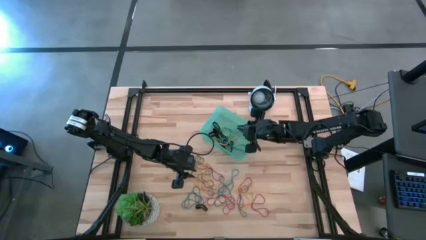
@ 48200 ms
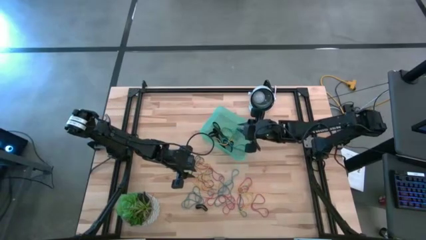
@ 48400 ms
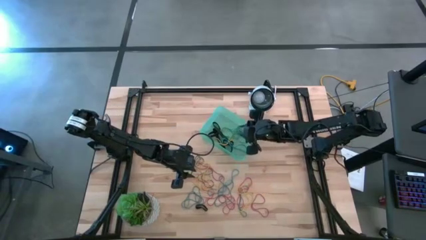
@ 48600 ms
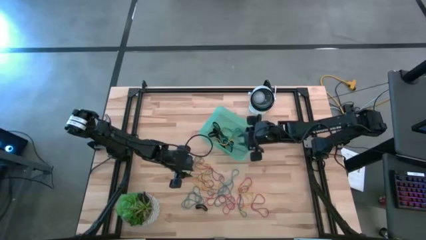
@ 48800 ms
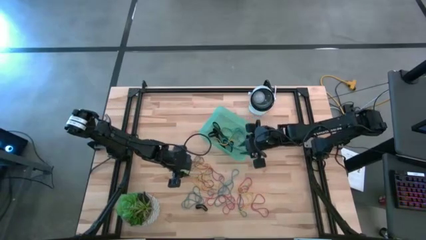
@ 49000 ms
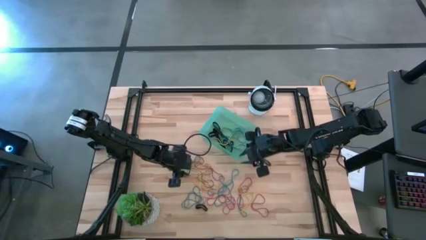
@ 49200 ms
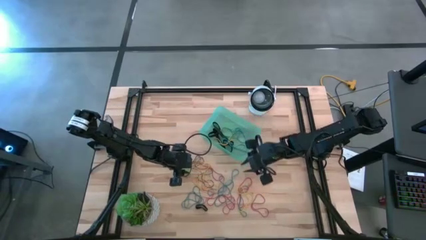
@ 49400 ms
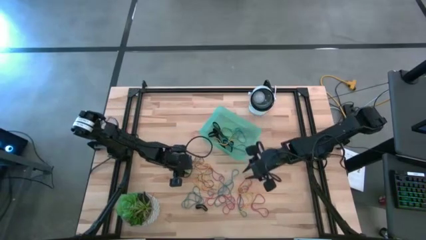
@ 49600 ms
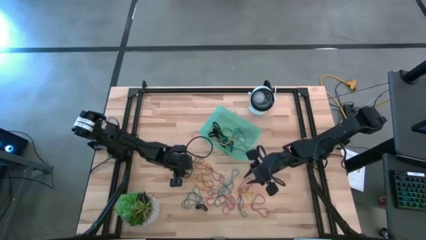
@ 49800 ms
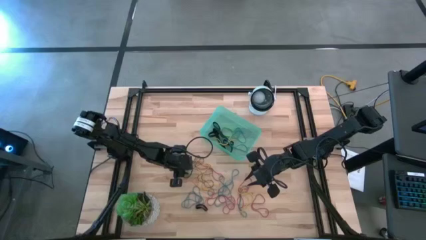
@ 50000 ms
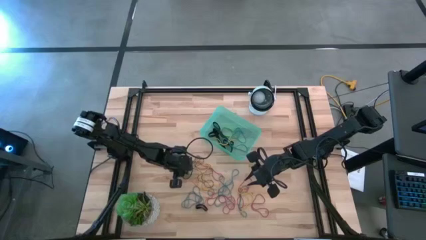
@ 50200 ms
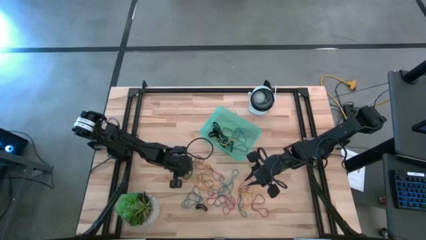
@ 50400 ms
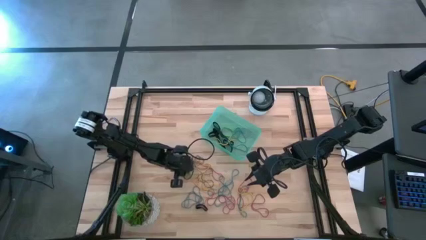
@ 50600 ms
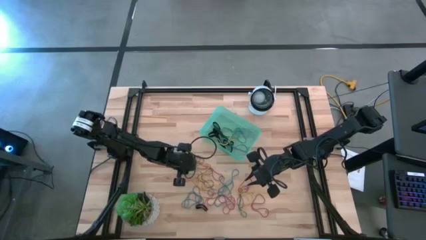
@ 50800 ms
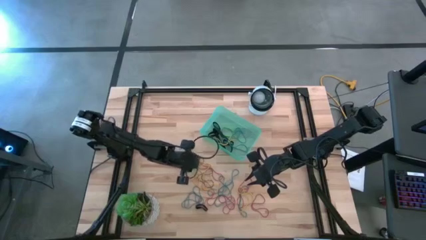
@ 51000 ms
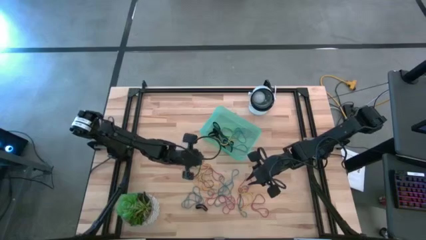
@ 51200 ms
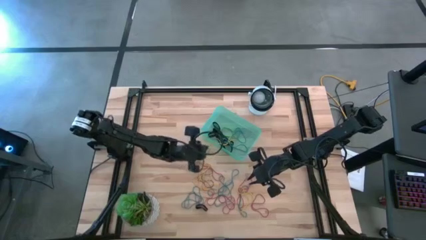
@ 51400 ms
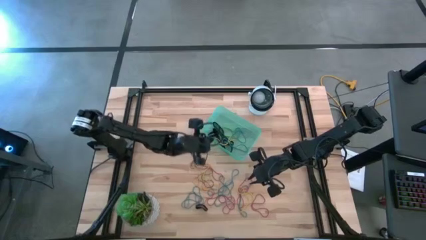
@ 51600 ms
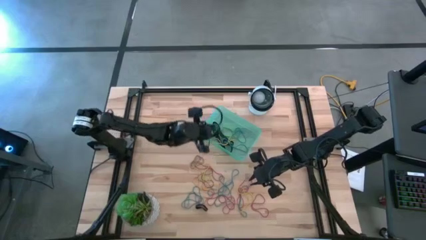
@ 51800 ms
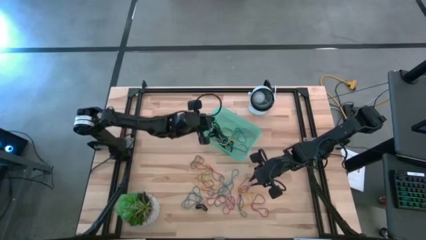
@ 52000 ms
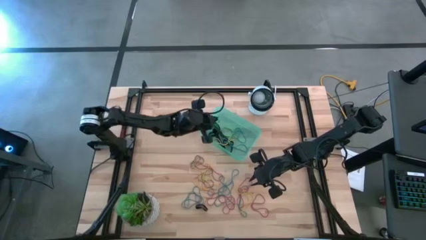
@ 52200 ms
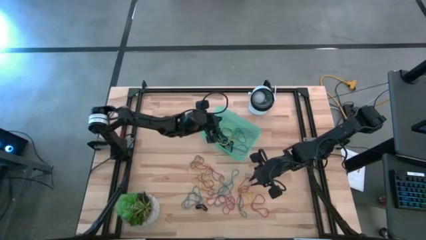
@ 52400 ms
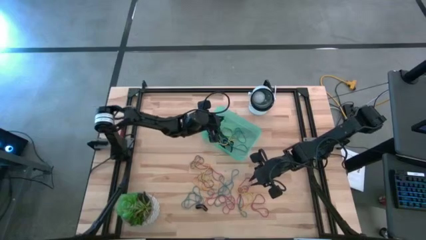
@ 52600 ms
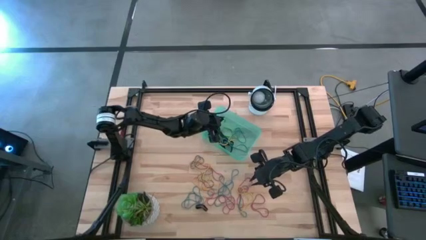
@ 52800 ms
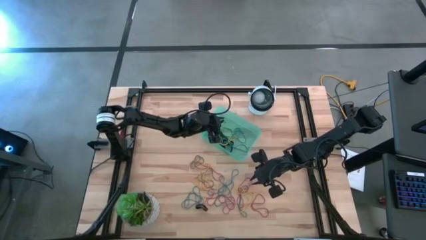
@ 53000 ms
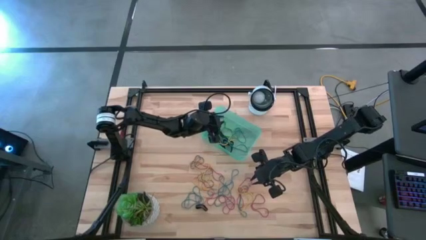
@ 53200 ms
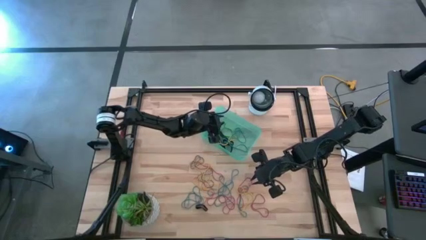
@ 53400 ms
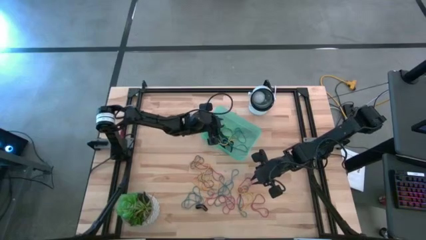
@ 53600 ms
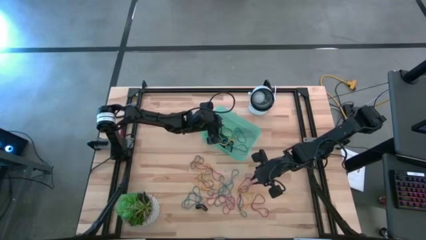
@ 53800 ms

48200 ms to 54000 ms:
Task: Pick and place rubber bands into bin
Put the green rubber band into the blue bin

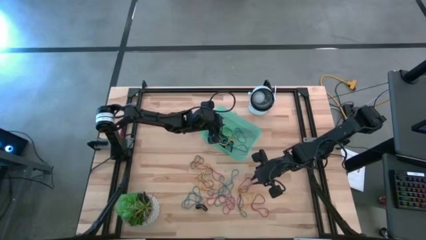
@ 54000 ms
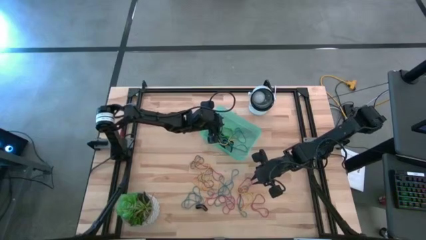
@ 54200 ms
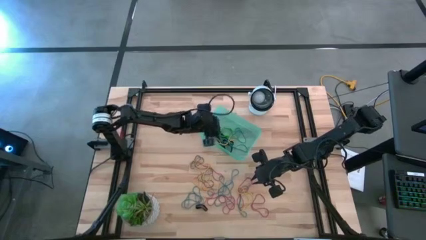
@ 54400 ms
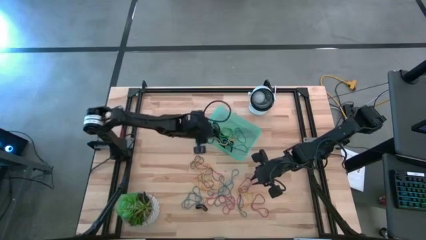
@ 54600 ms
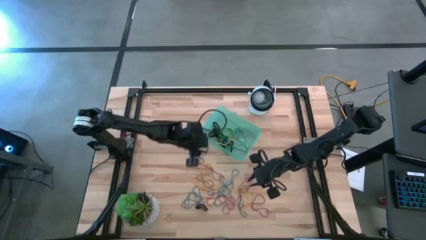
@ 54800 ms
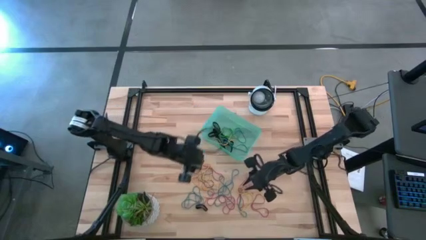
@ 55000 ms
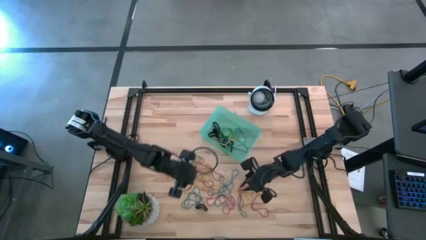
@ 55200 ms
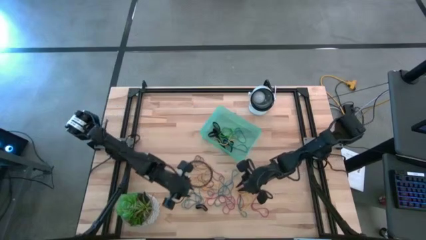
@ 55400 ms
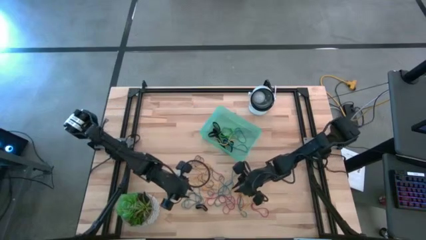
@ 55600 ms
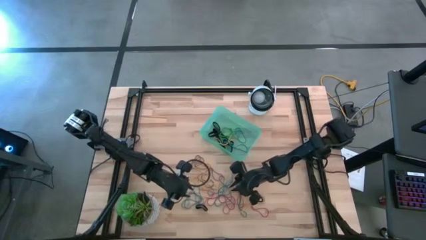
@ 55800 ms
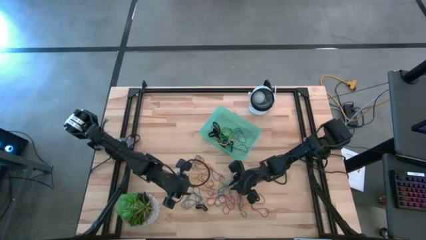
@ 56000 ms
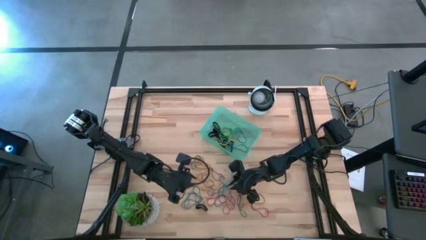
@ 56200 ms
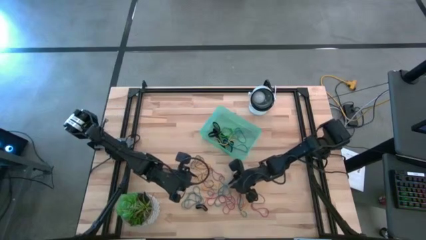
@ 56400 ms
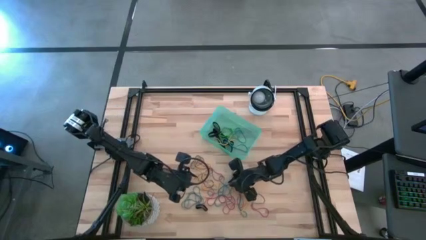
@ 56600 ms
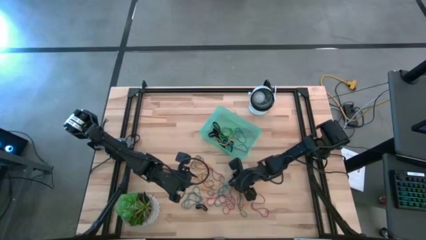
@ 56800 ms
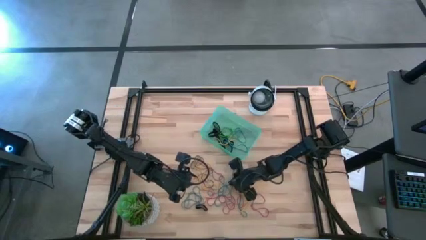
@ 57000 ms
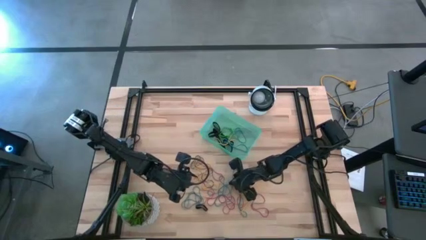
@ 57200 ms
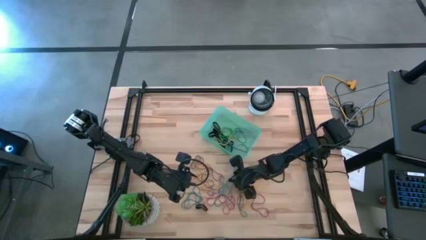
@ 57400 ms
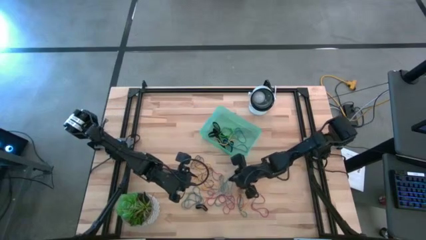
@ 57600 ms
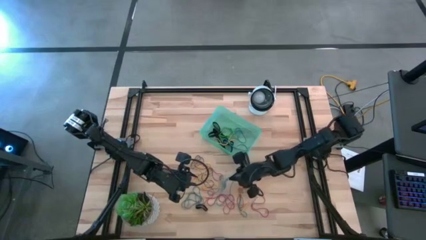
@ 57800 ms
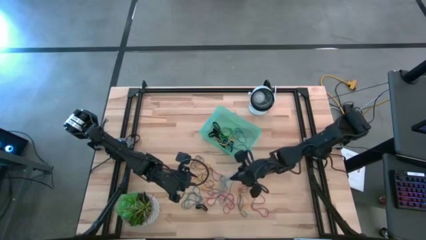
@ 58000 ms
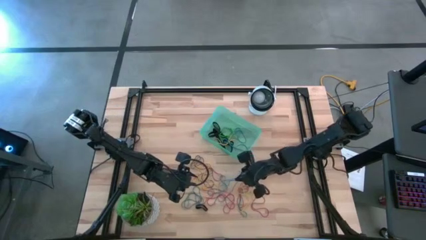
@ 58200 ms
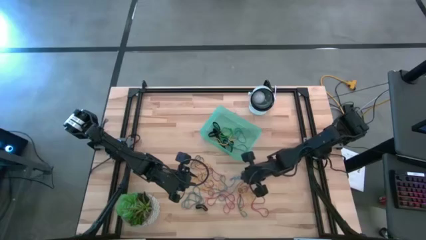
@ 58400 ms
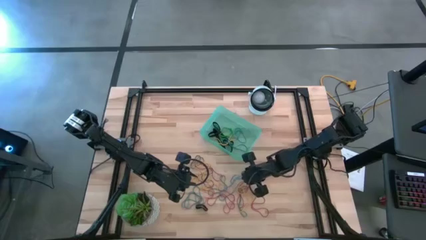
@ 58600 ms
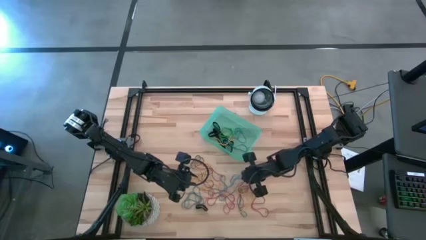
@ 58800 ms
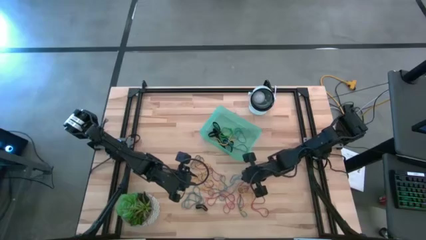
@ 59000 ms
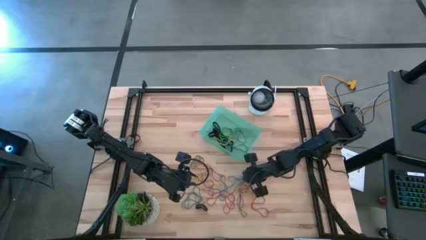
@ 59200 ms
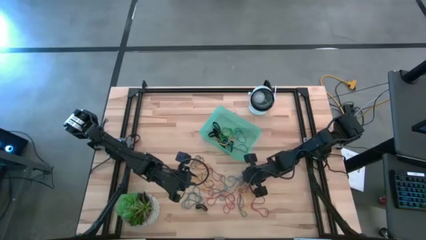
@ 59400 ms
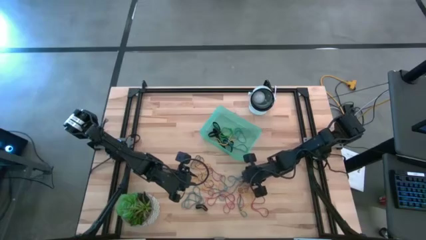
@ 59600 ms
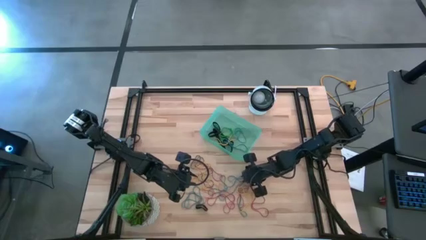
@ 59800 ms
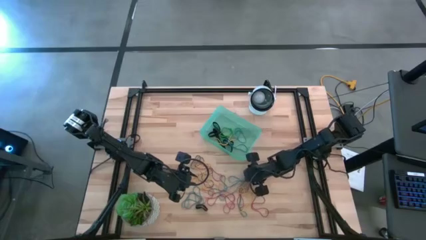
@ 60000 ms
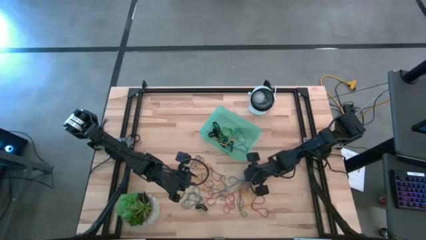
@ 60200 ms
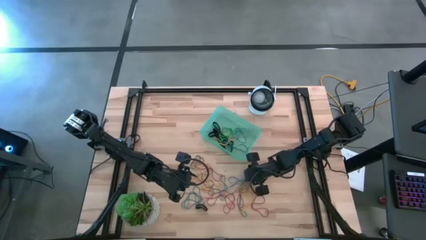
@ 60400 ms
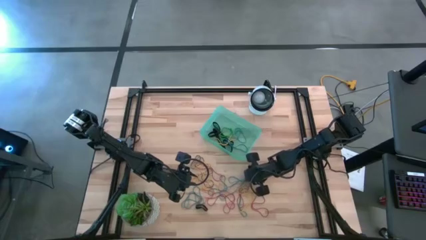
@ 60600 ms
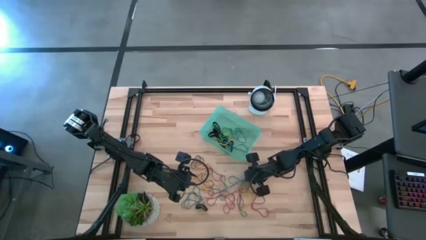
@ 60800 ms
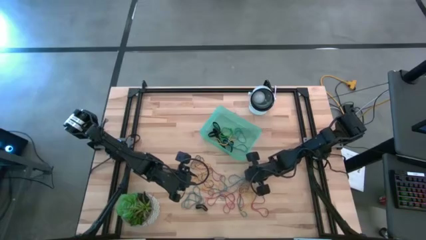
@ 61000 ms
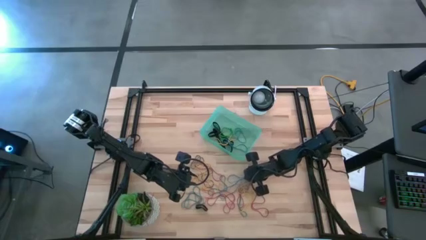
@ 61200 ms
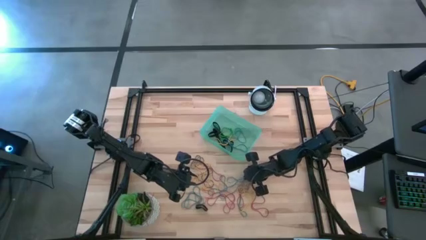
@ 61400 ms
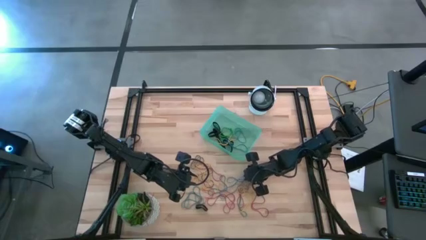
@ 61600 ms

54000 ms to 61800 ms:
Put the blue rubber band into the blue bin

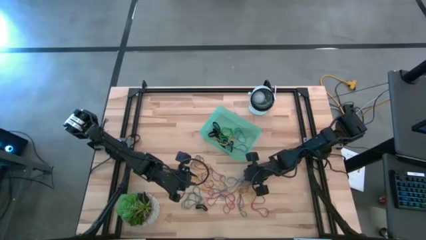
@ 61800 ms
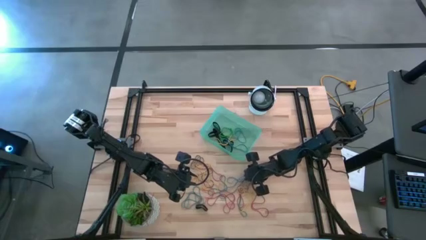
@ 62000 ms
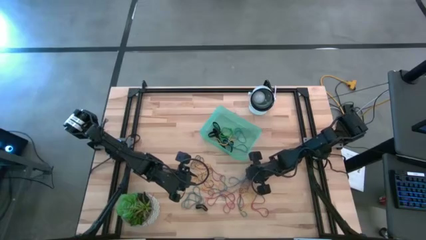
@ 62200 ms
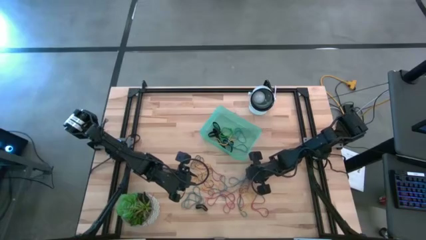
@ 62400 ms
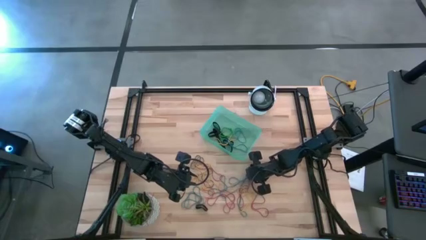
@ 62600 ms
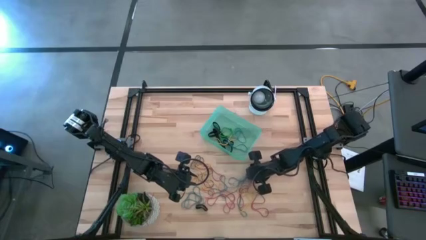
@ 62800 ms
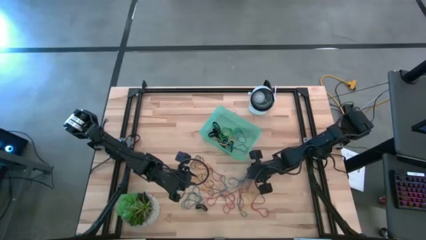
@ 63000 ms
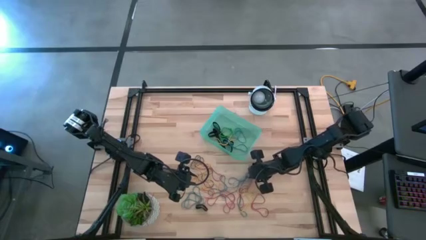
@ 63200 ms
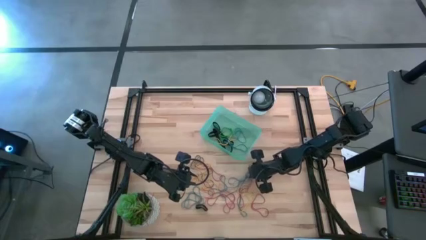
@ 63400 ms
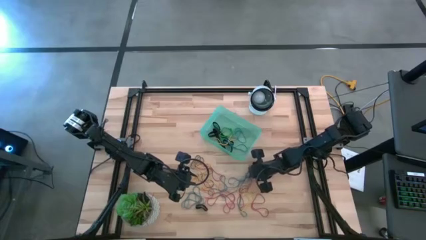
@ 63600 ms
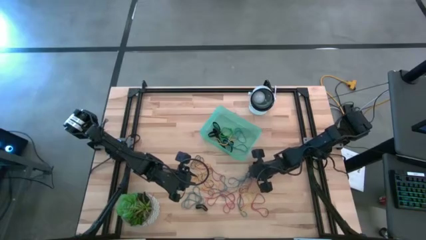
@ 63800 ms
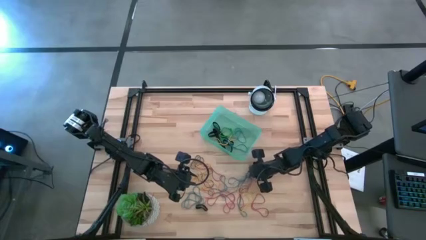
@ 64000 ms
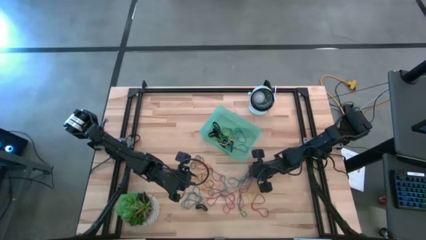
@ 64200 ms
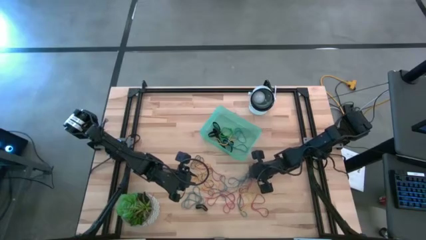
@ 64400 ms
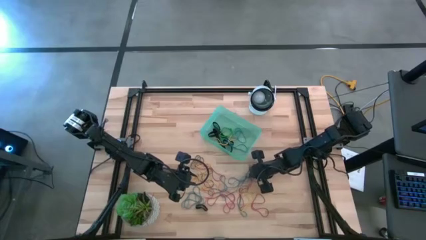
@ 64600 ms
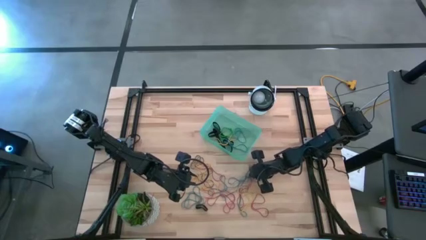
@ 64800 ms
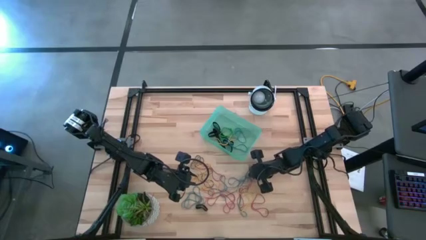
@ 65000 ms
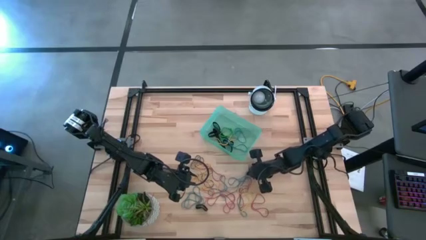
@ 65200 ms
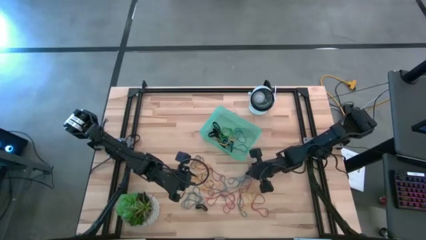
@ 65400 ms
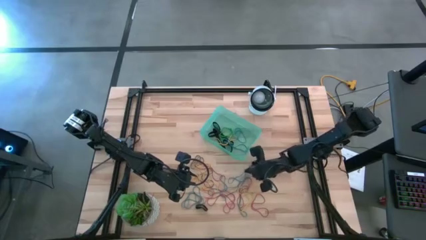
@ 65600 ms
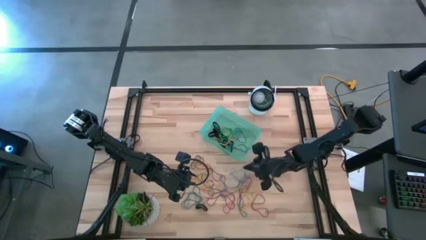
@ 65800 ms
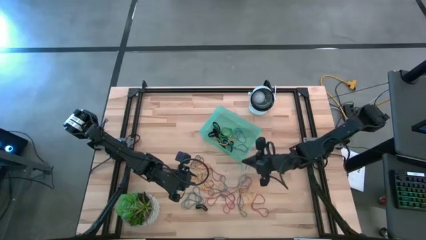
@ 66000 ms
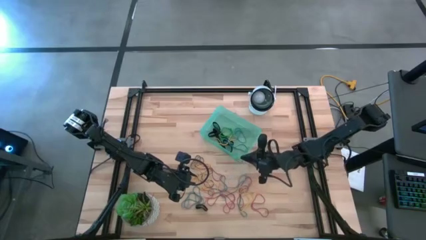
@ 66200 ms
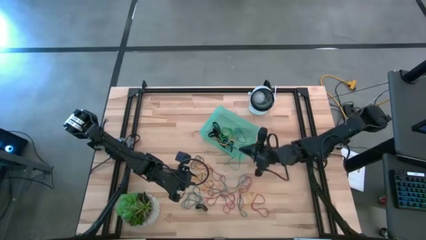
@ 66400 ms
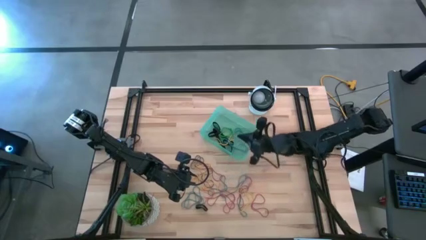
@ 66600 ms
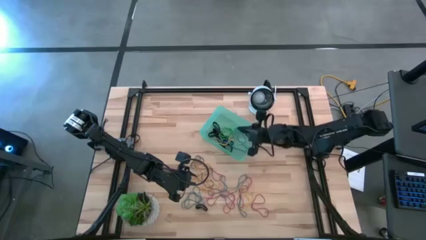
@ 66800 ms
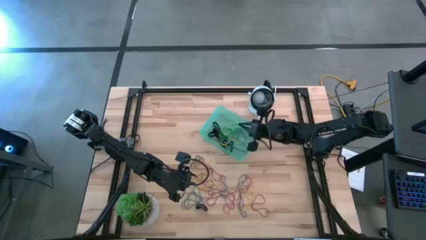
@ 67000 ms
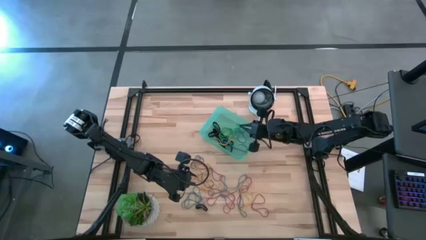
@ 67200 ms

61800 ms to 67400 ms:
Put the blue rubber band into the blue bin
